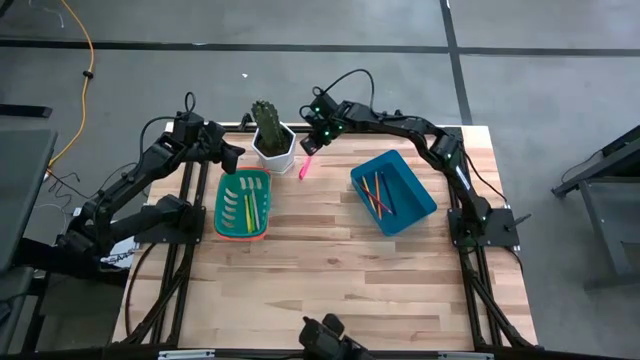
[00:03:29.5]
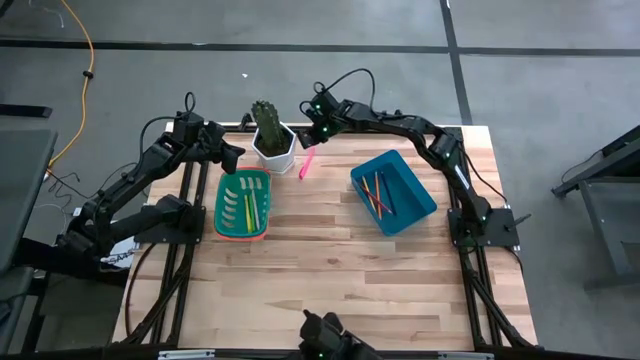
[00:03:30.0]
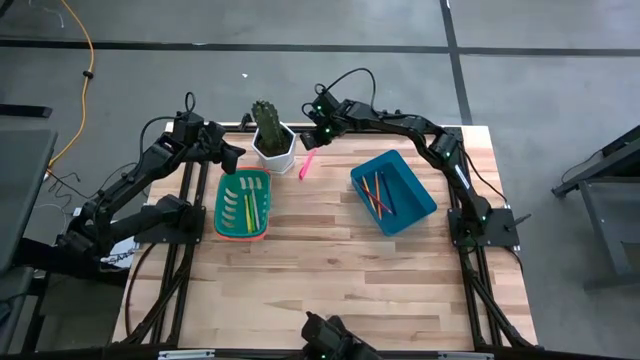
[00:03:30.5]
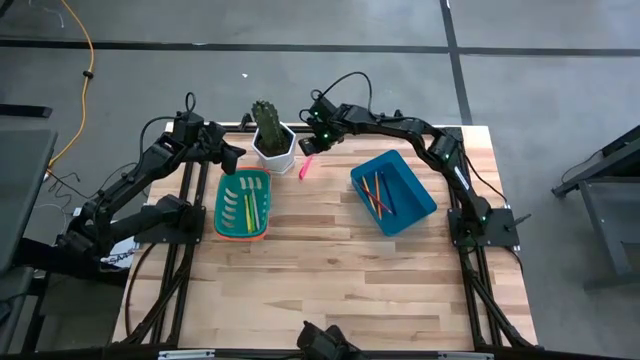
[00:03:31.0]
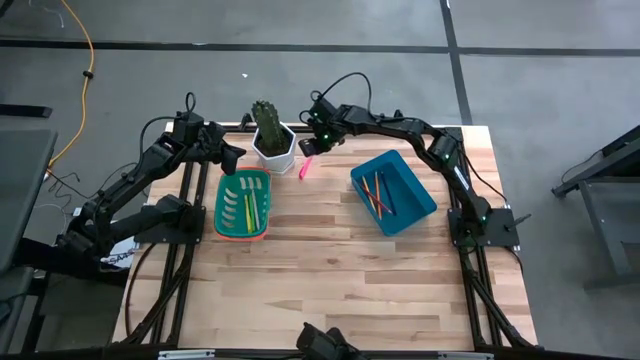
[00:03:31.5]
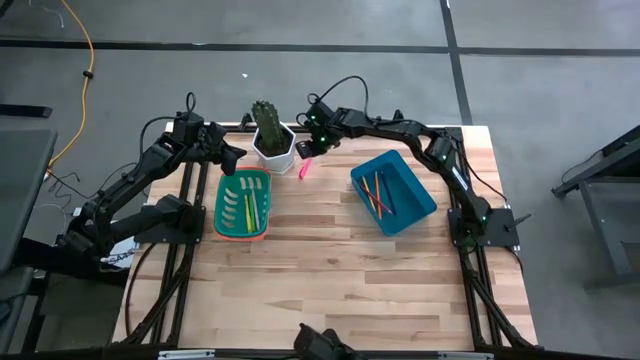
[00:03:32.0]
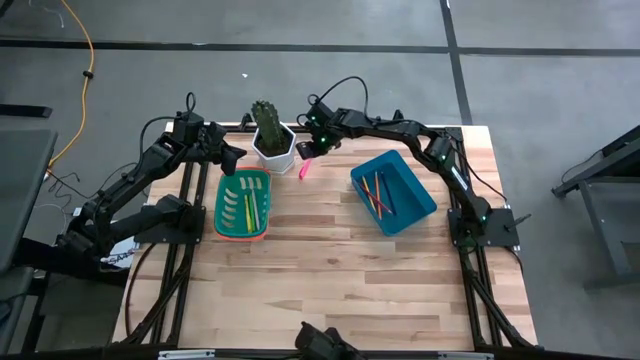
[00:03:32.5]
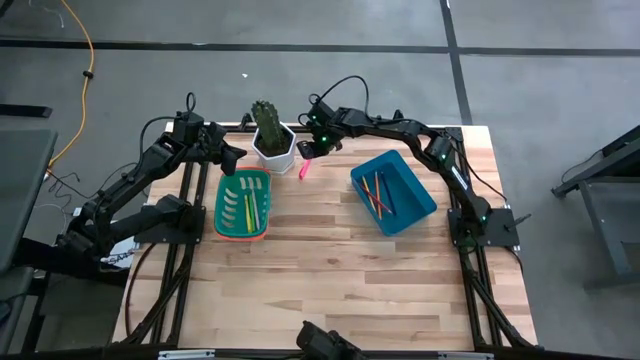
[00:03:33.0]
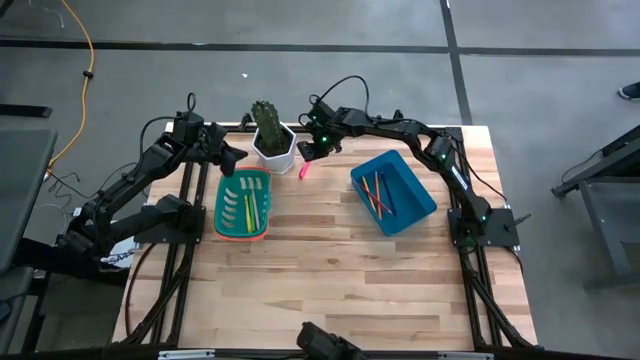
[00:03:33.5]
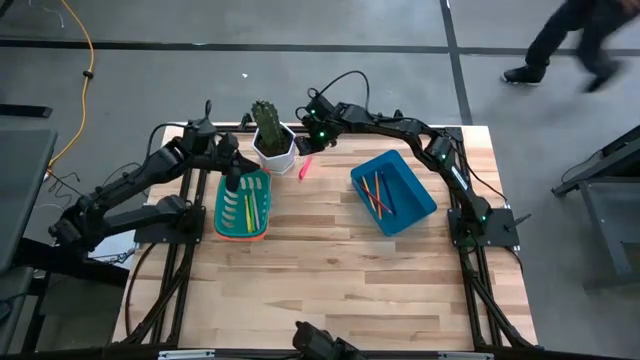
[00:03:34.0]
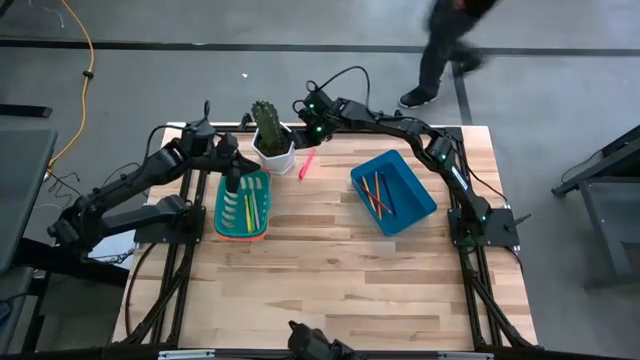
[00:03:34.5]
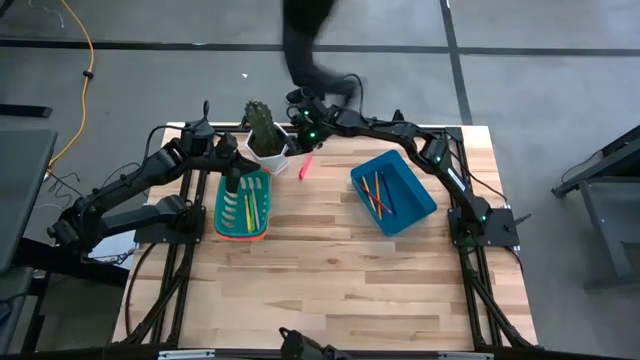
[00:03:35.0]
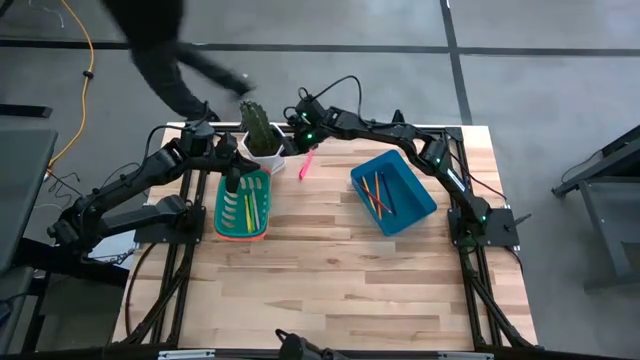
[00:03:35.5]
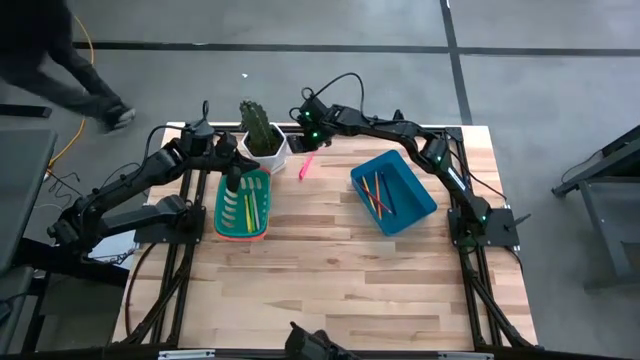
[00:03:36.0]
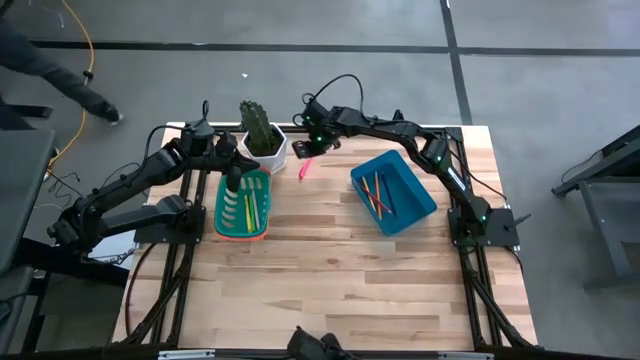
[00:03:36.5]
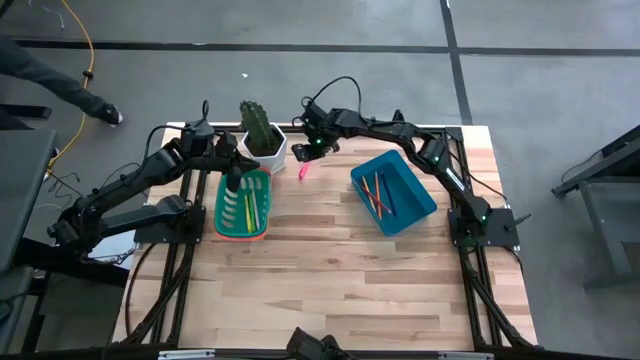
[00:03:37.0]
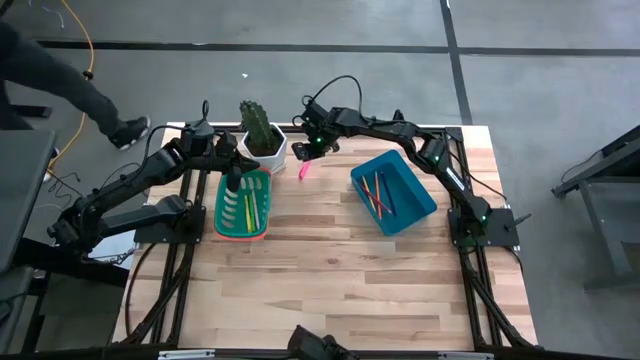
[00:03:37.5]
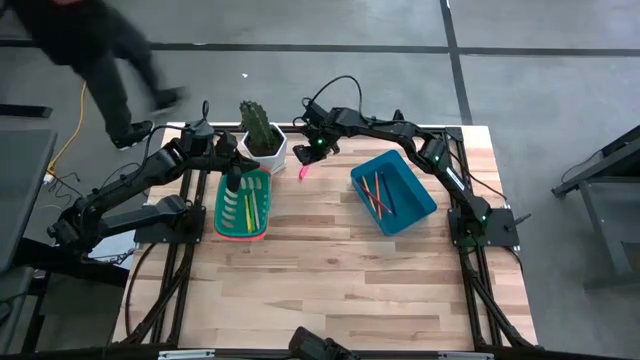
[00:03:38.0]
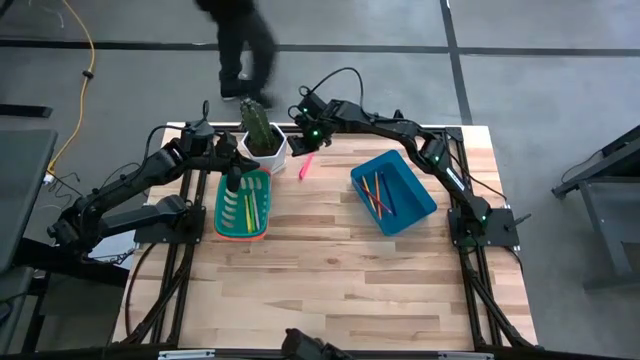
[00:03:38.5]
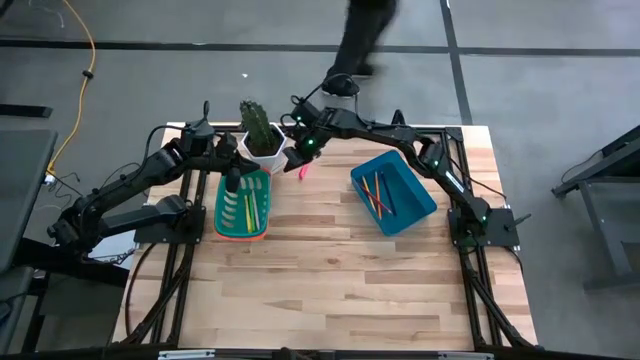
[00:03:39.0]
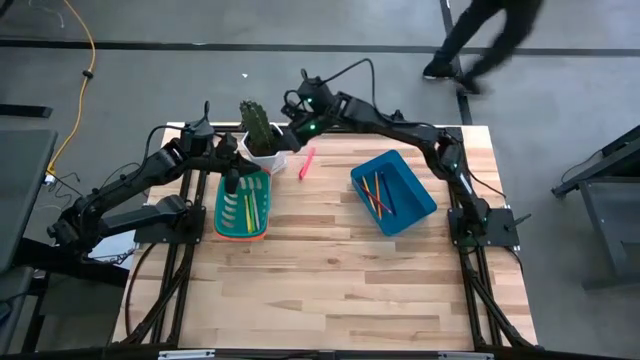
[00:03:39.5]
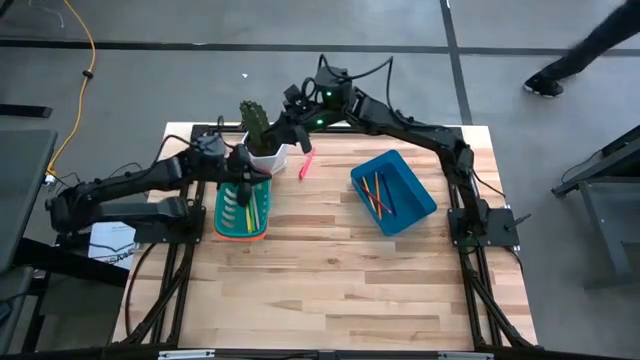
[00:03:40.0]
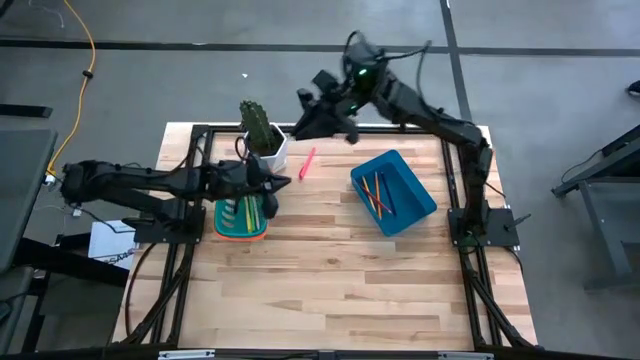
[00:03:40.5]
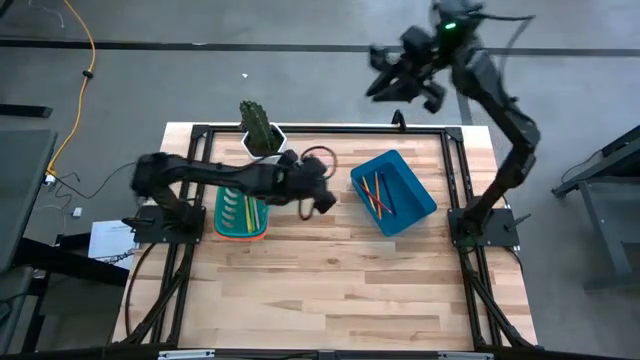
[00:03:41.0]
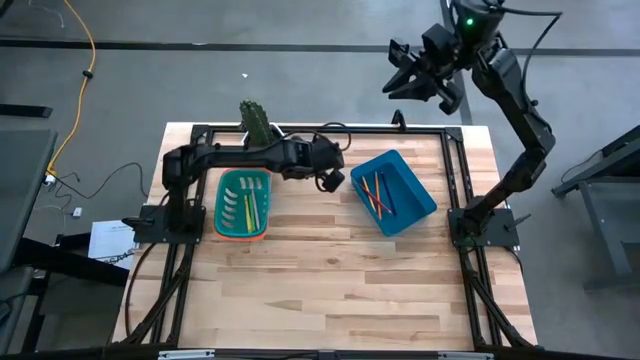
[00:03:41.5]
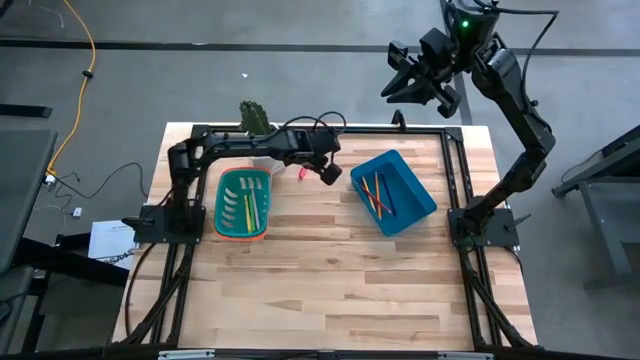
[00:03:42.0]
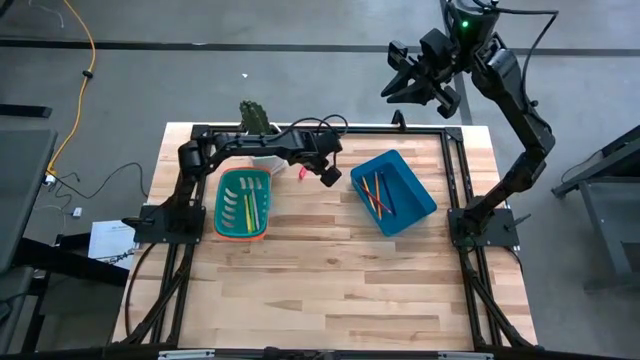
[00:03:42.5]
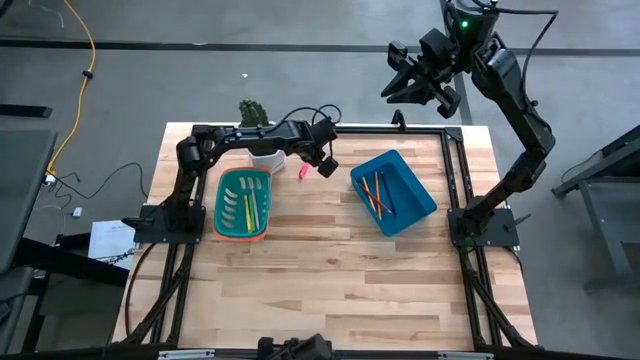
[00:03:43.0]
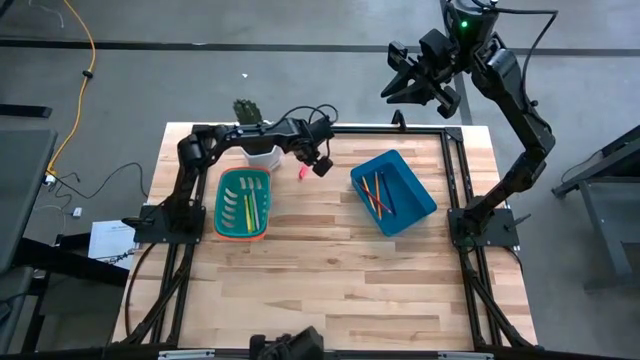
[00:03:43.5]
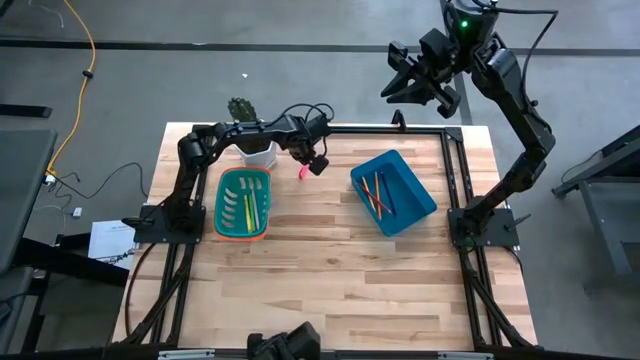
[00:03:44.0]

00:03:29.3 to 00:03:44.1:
Task: Sort pens & pencils
Adjust the potted plant on the table

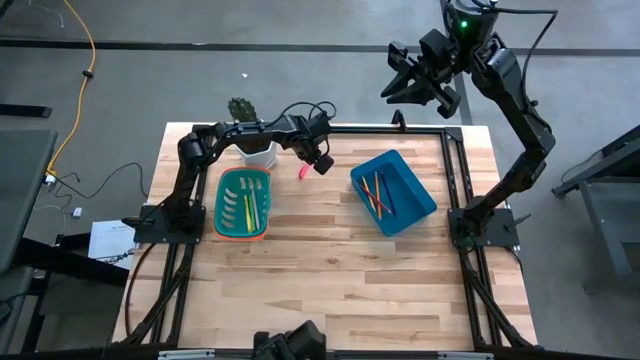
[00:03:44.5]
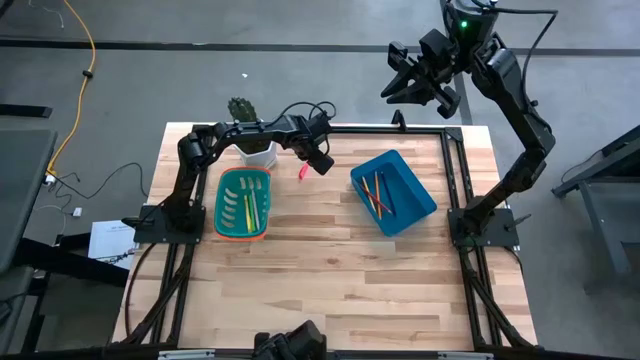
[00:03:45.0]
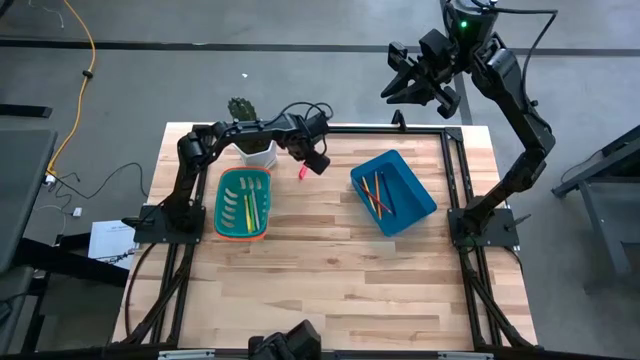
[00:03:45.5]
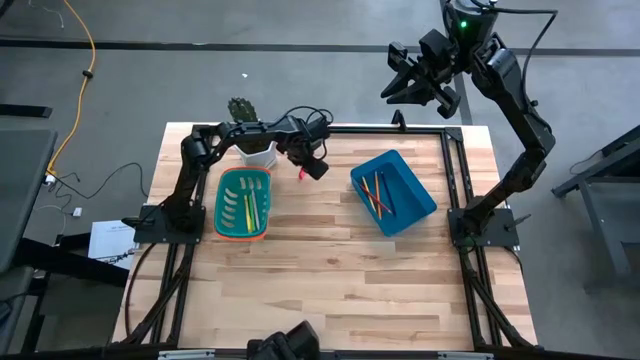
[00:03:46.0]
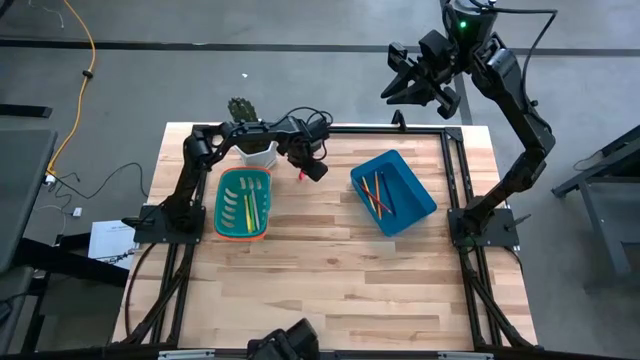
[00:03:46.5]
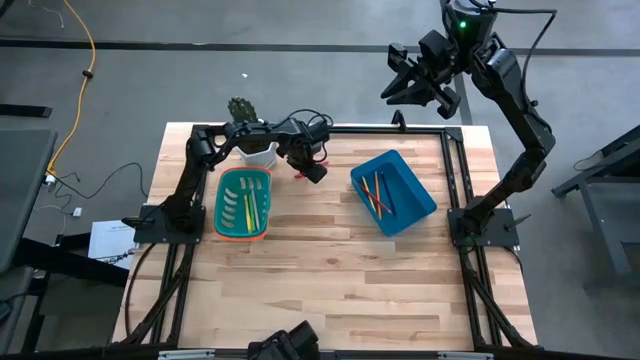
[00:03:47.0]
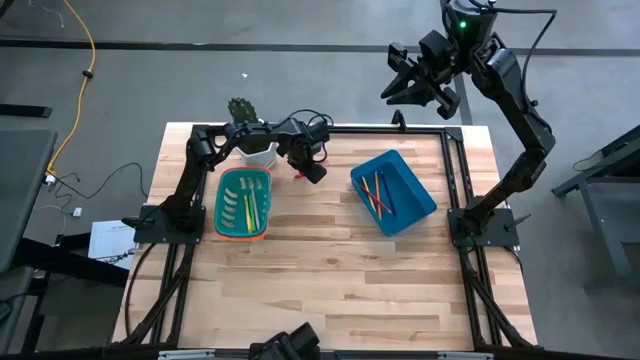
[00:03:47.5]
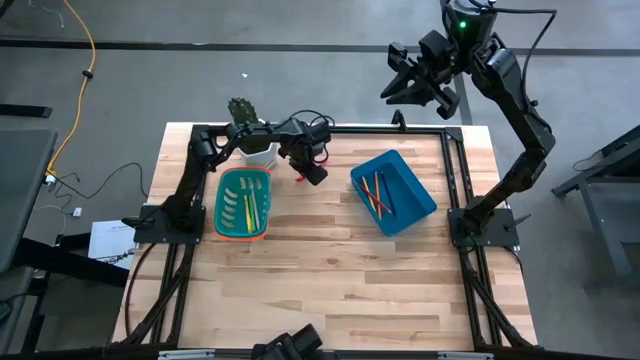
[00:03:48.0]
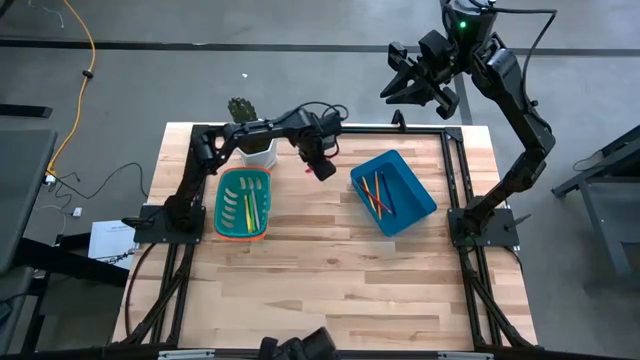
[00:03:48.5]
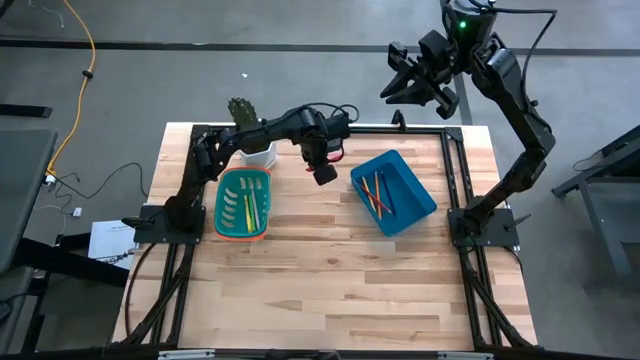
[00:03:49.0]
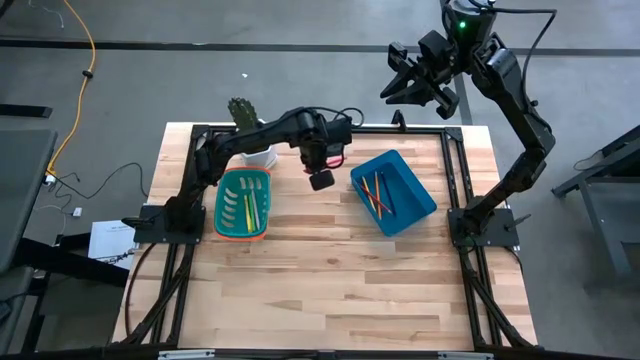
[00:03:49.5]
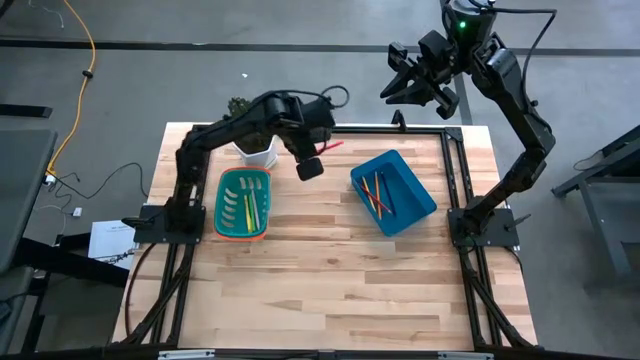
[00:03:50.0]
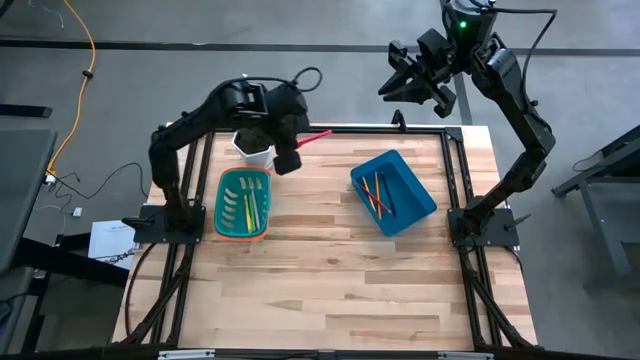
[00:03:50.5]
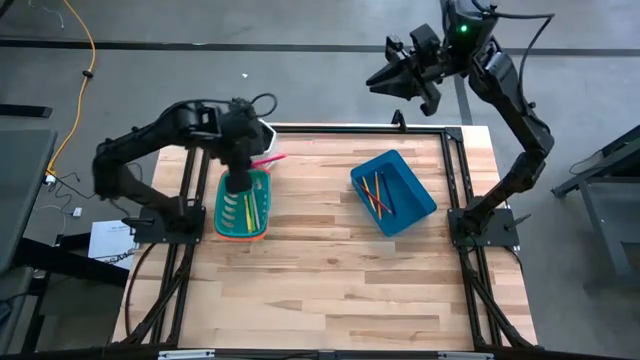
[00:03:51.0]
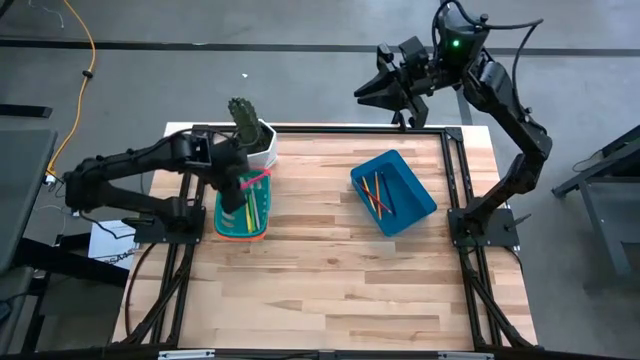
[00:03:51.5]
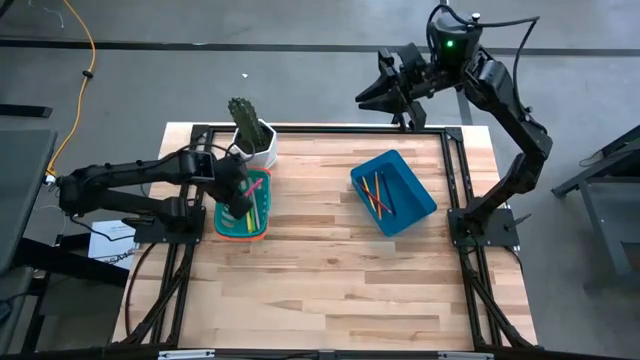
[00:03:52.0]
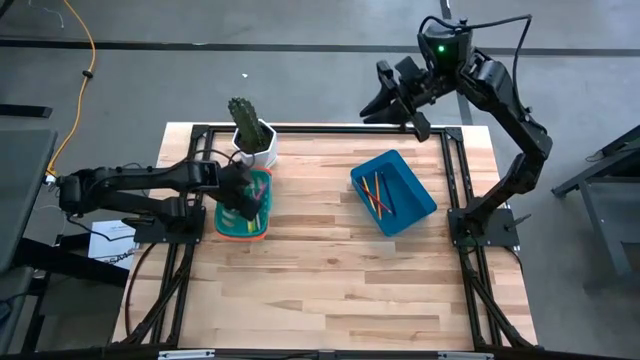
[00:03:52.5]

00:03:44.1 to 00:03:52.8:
Put the pink pen into the green basket
